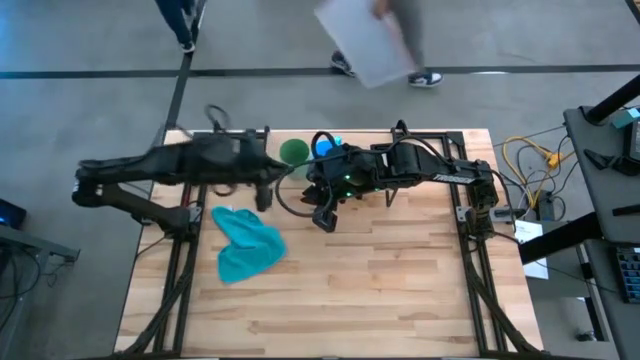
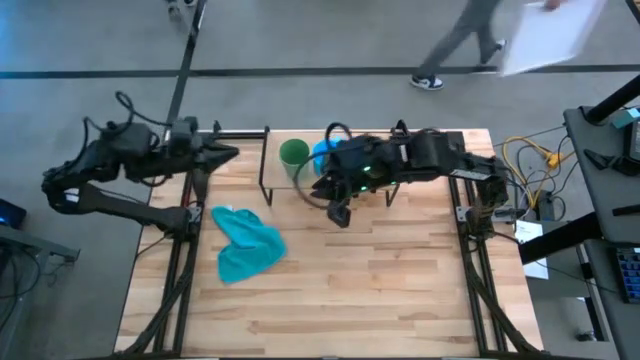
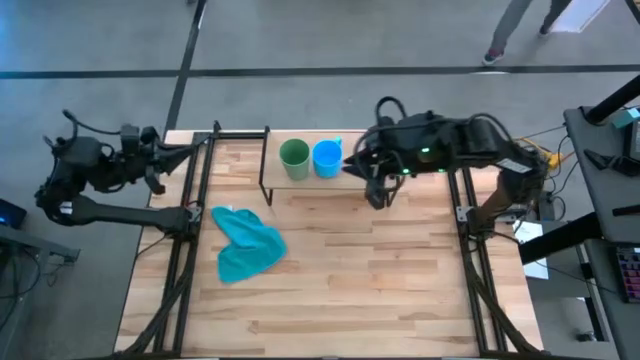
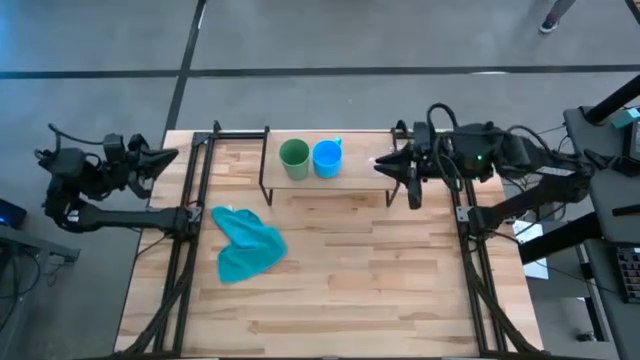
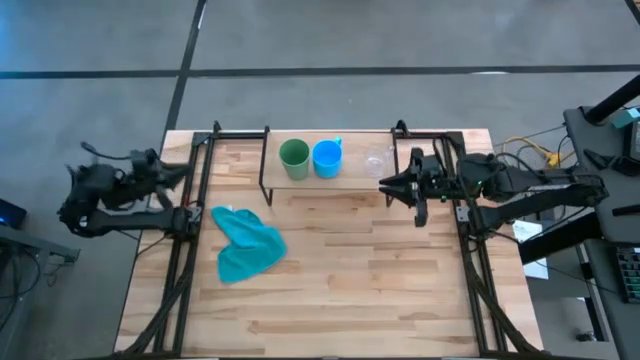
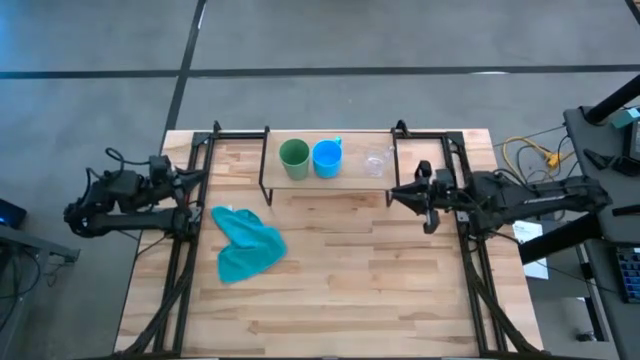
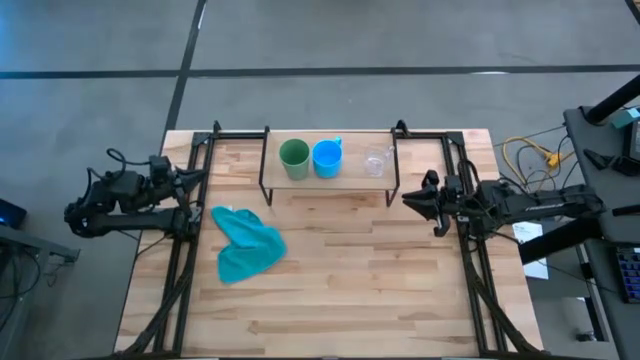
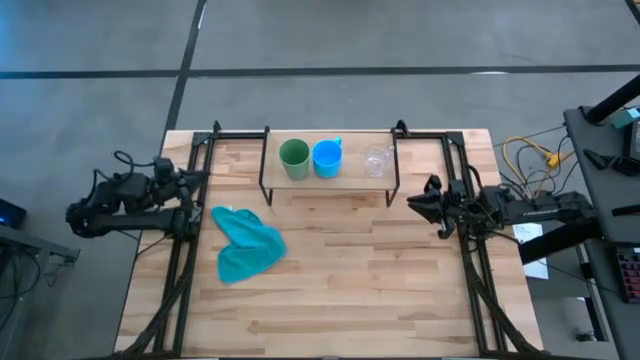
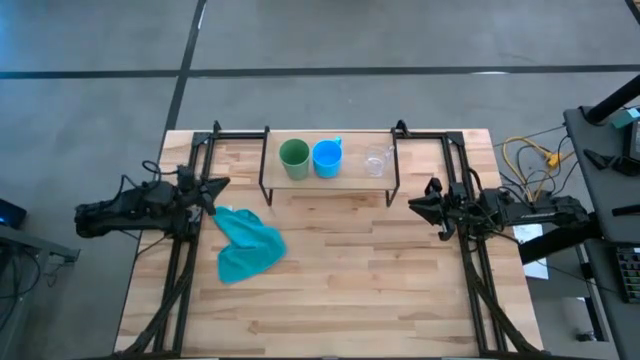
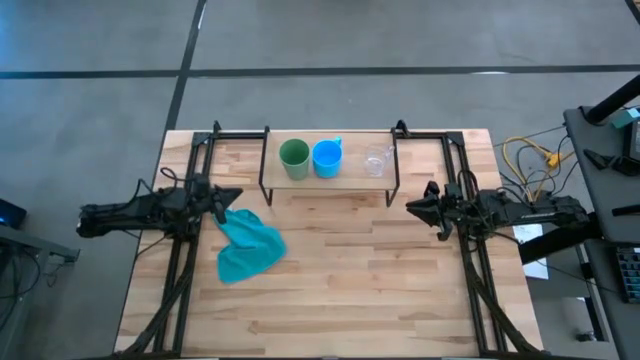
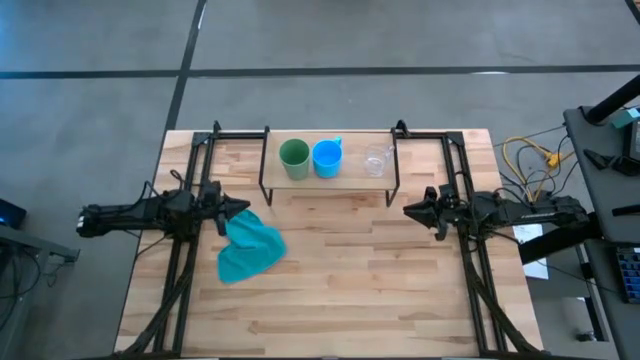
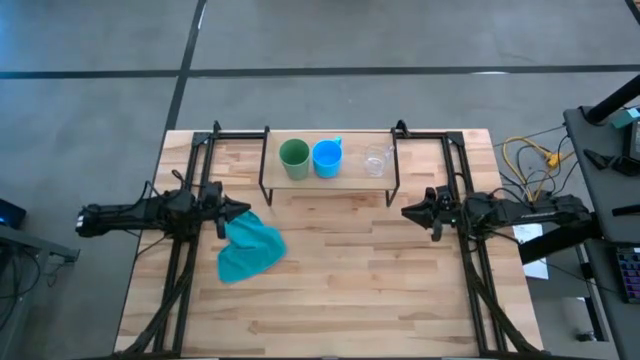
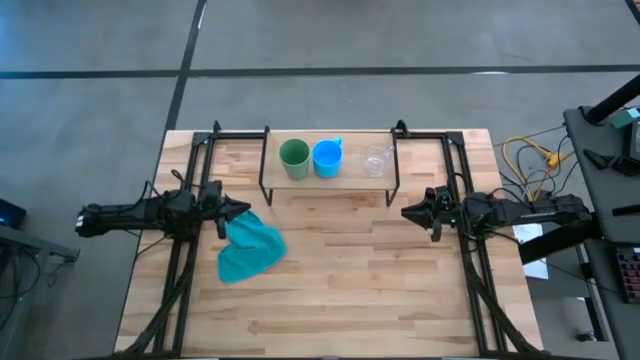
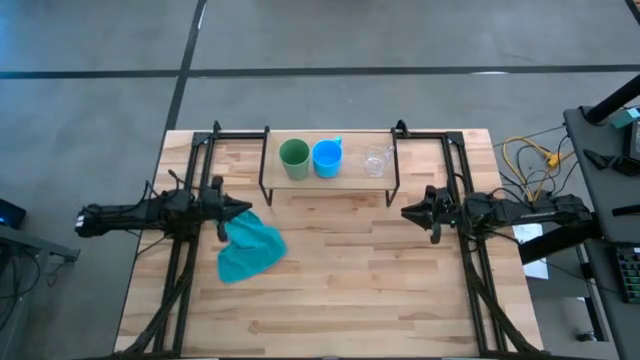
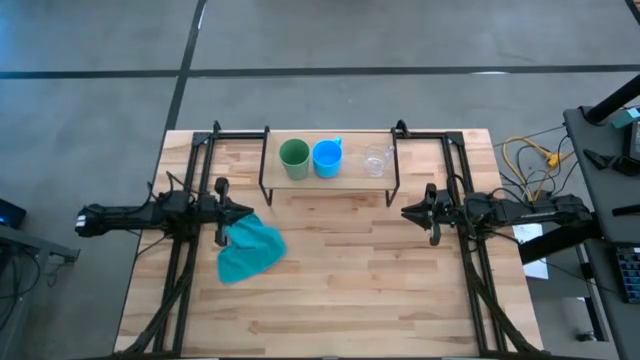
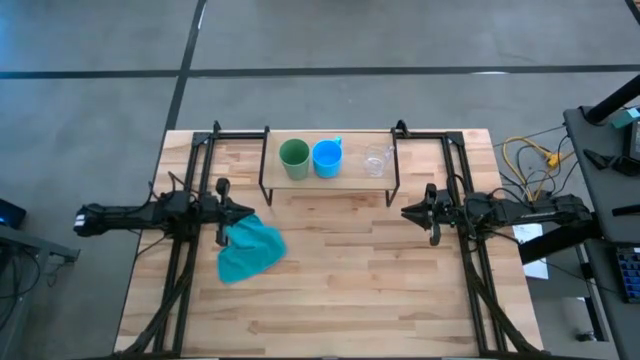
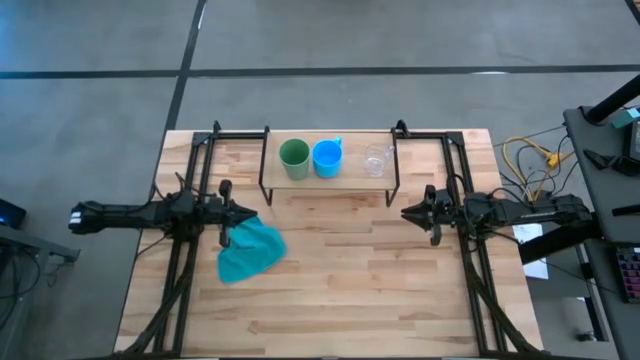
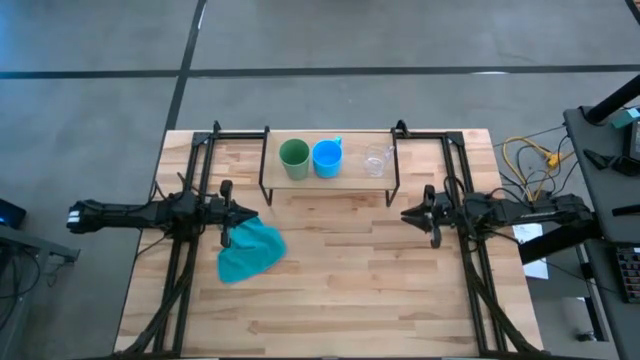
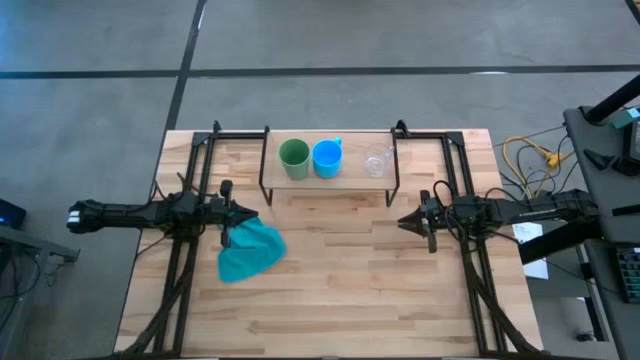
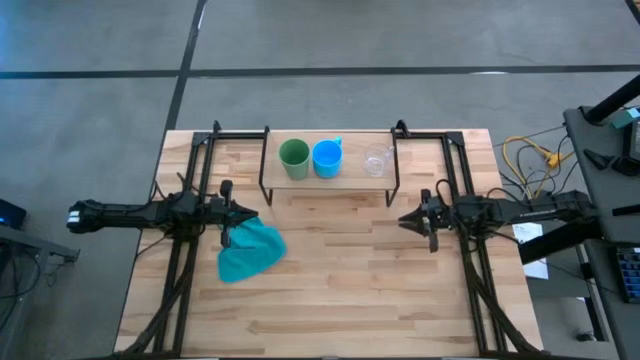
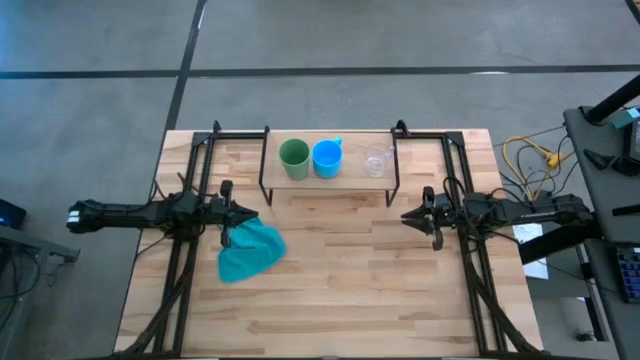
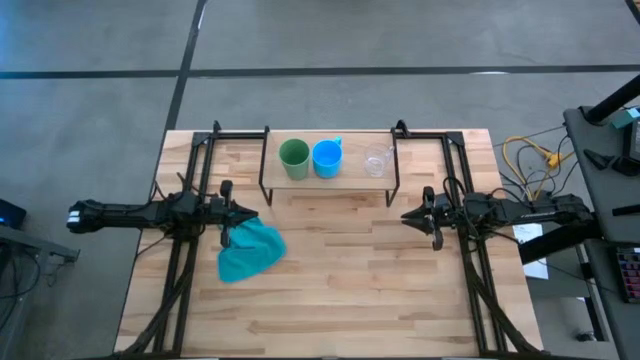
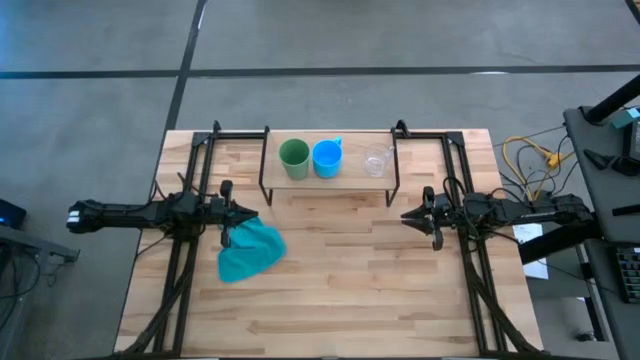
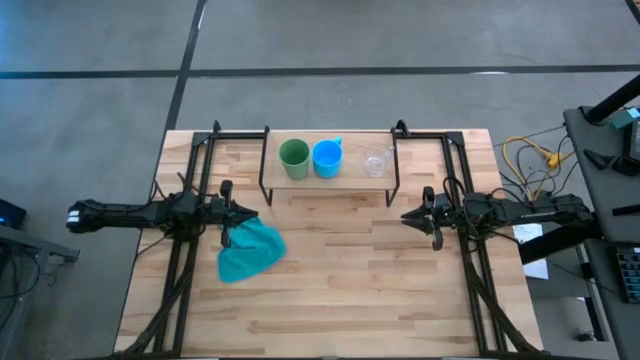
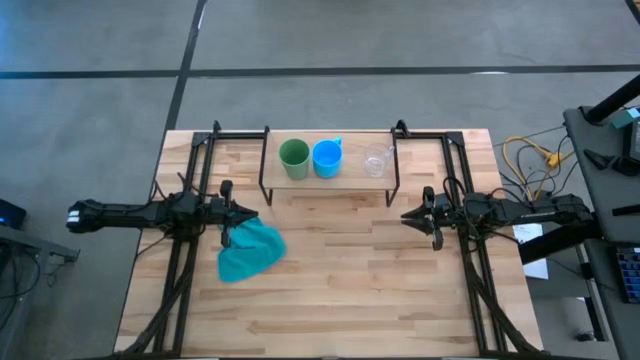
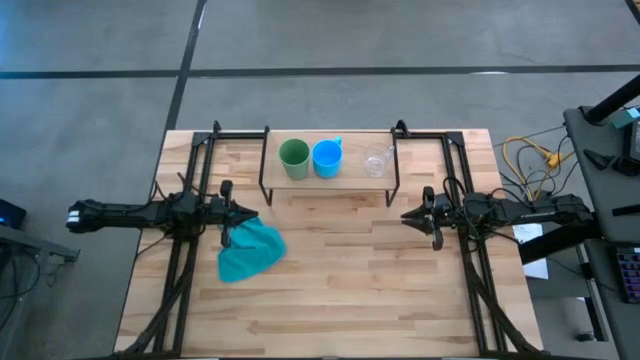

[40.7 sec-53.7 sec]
Task: Stack small to large cups/mugs on shelf
Return to Home Position

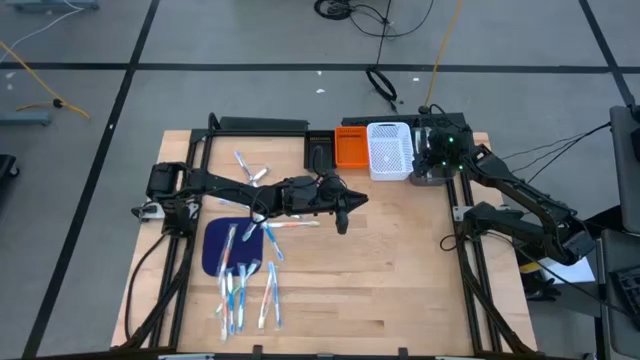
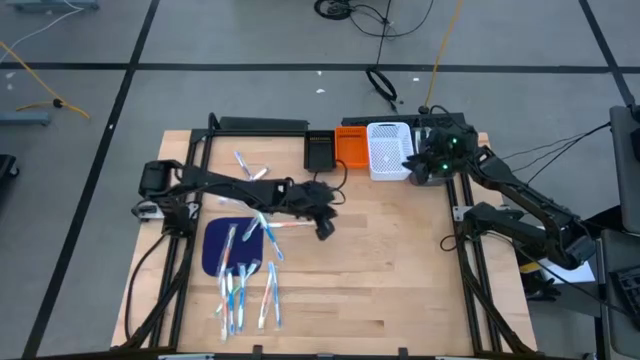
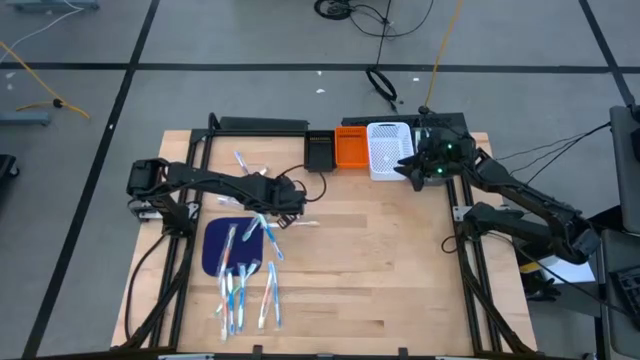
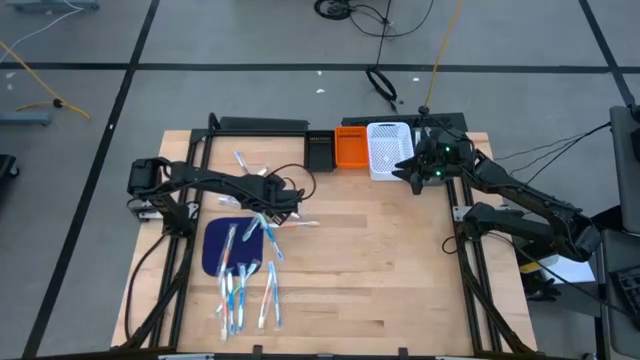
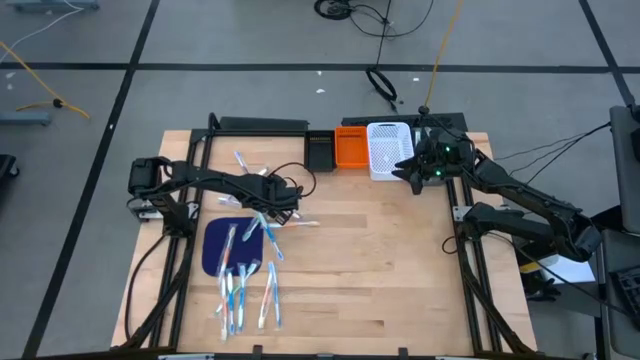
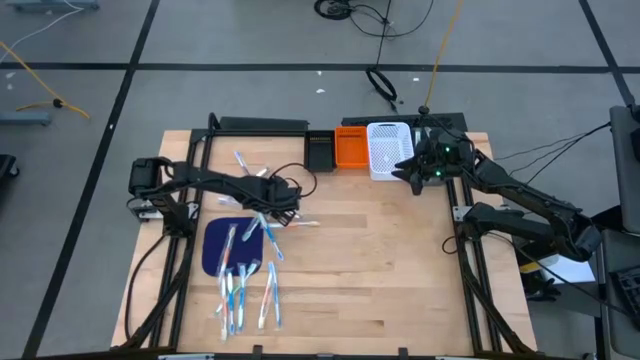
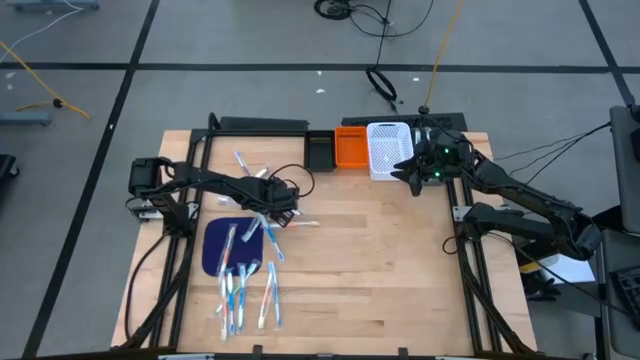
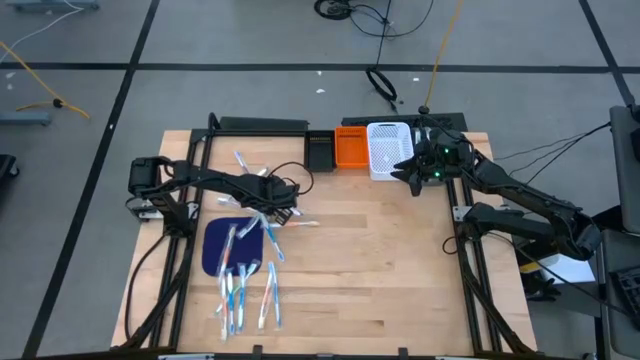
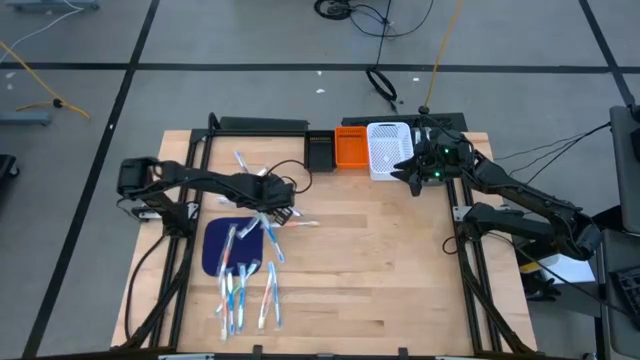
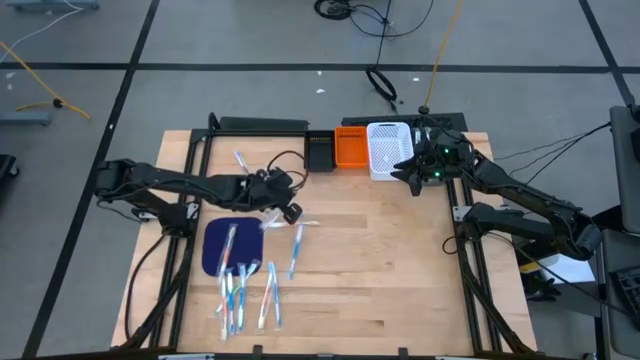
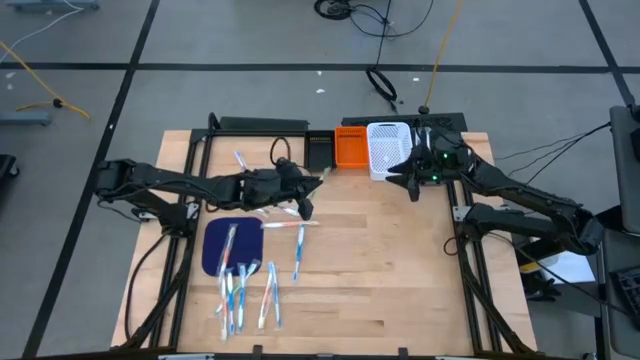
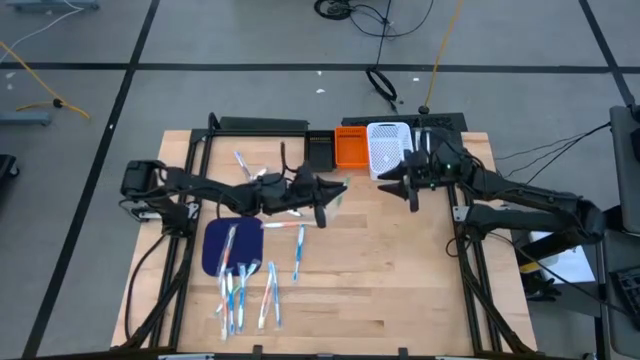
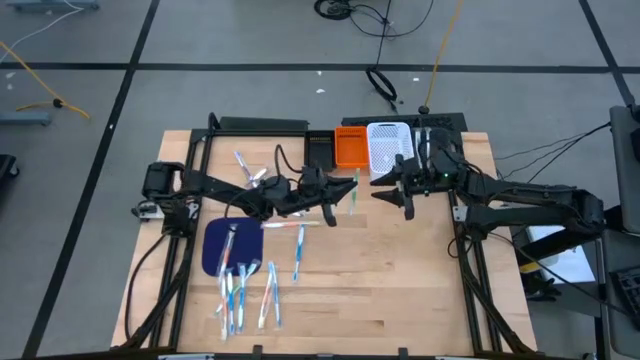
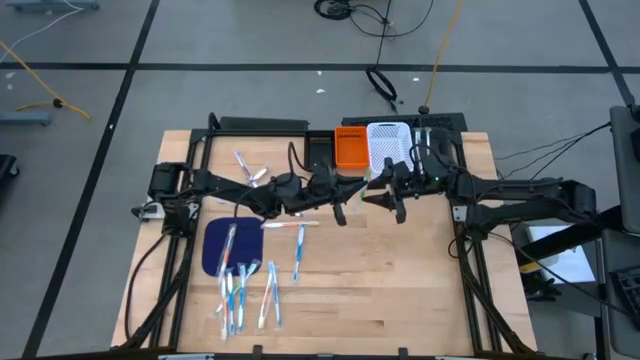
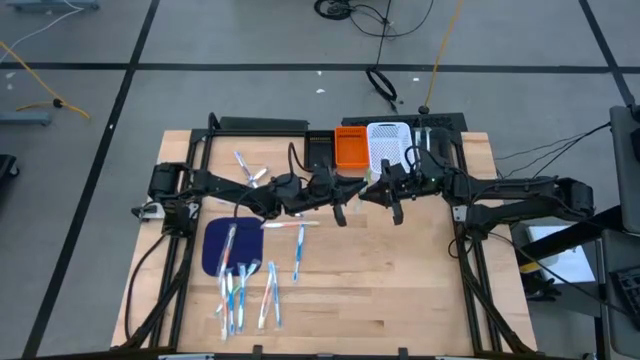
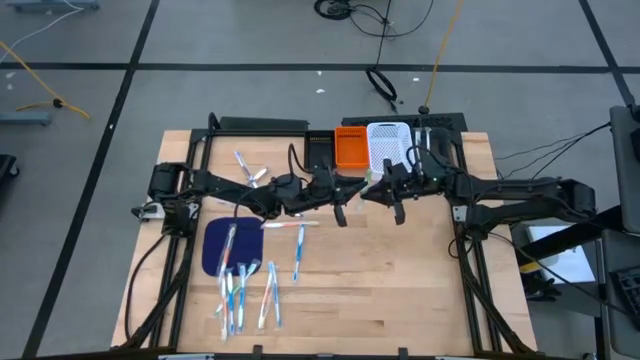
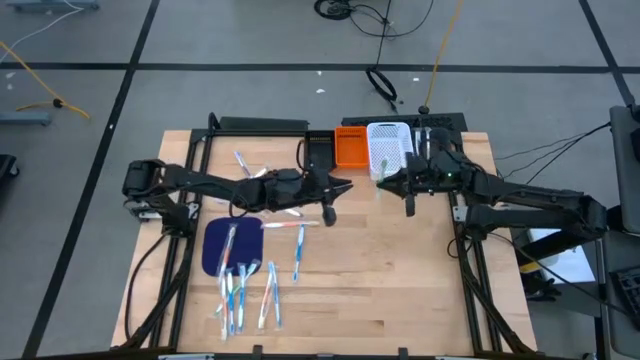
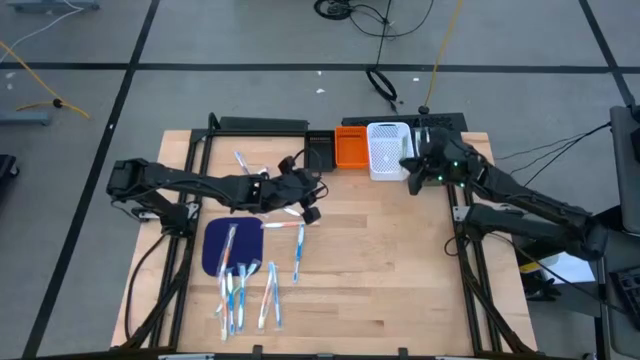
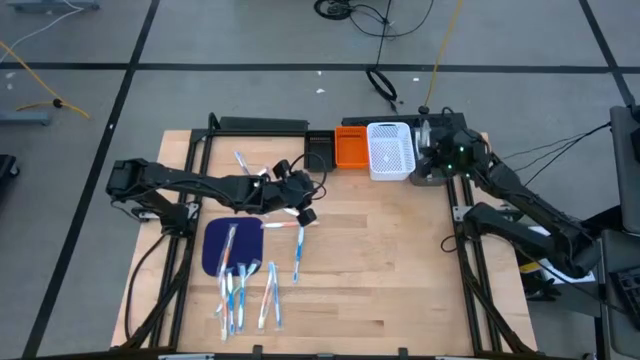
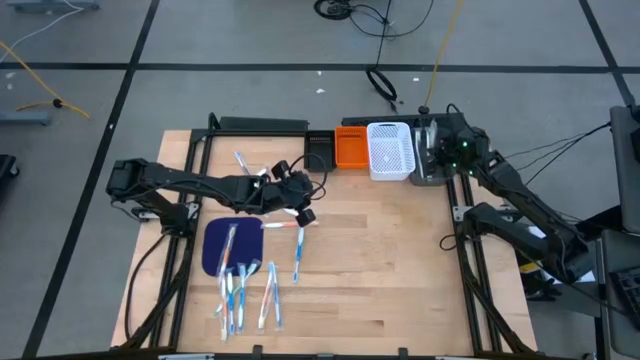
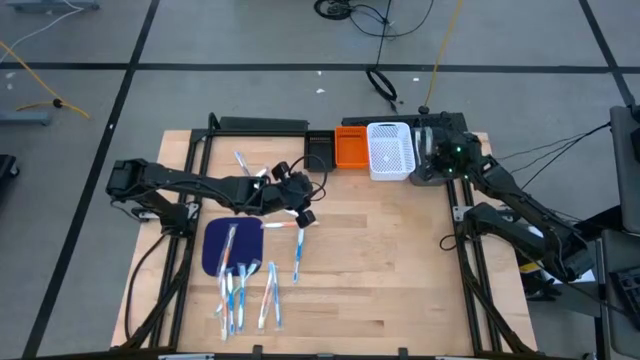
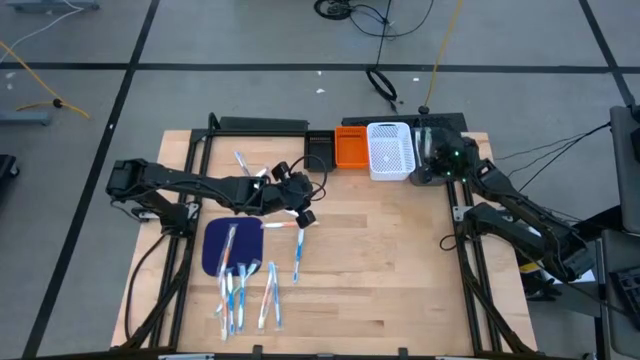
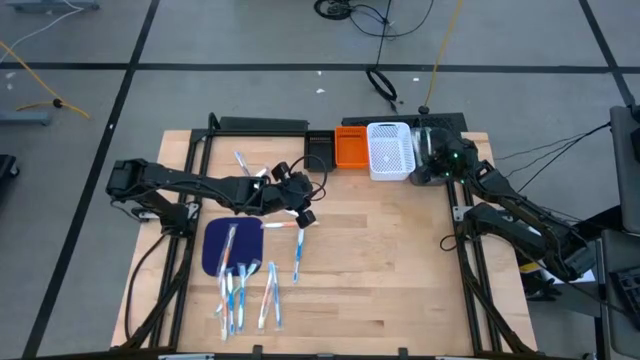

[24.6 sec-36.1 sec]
Task: Pick & Place Toothbrushes
Put the green toothbrush into the gray bin
